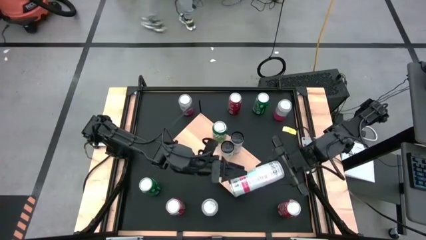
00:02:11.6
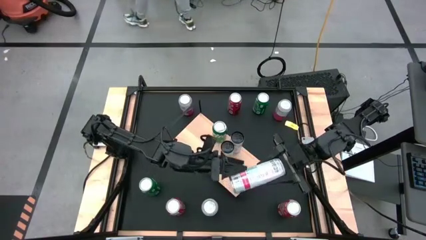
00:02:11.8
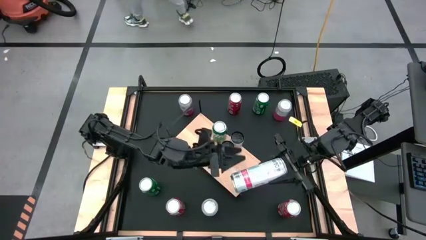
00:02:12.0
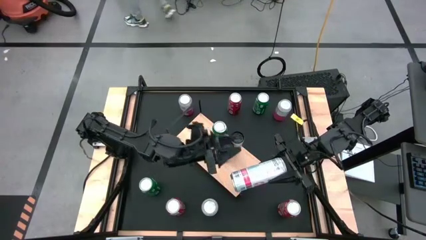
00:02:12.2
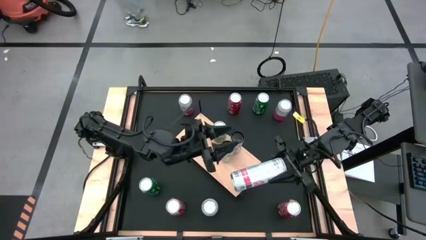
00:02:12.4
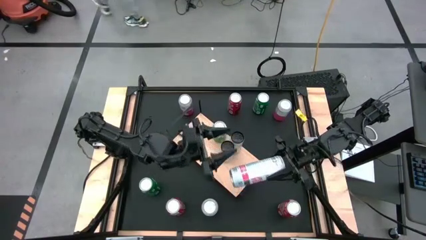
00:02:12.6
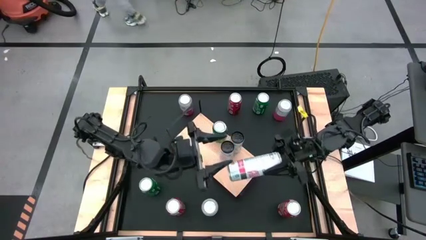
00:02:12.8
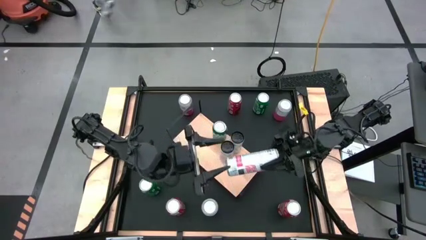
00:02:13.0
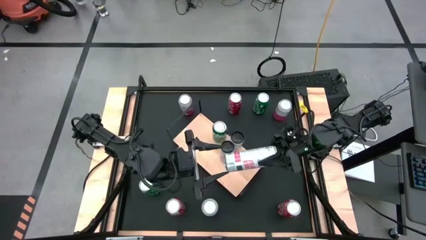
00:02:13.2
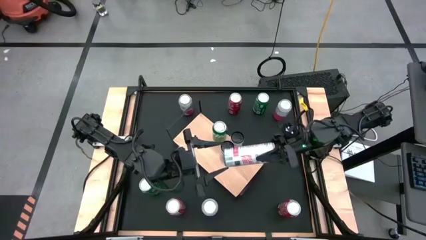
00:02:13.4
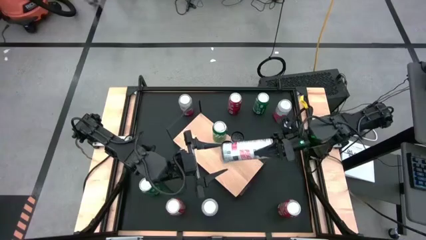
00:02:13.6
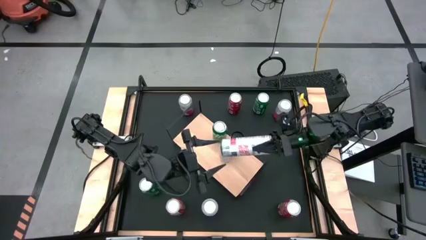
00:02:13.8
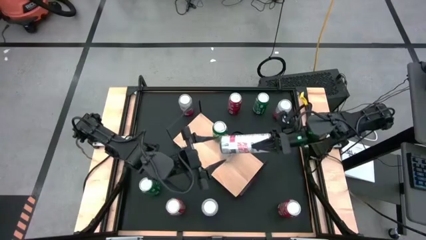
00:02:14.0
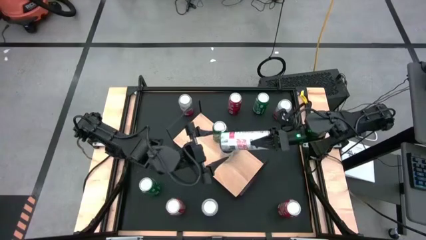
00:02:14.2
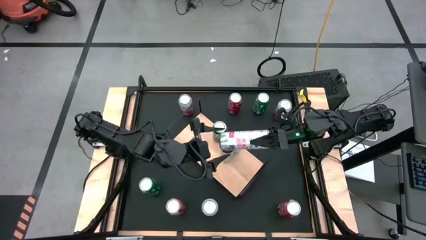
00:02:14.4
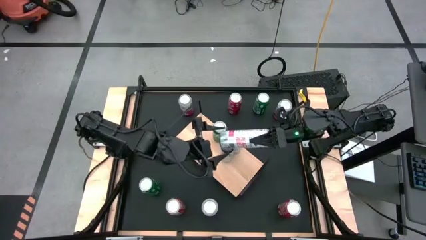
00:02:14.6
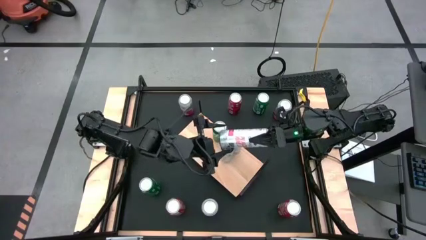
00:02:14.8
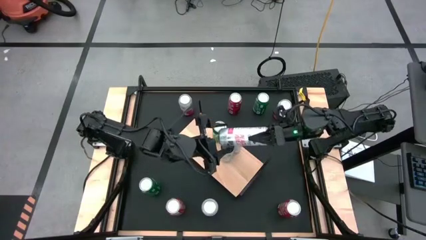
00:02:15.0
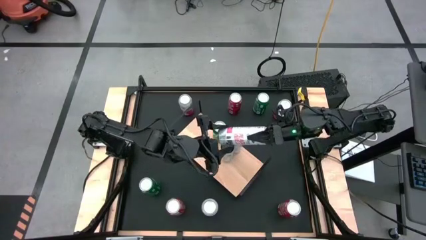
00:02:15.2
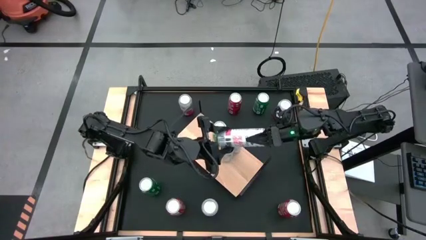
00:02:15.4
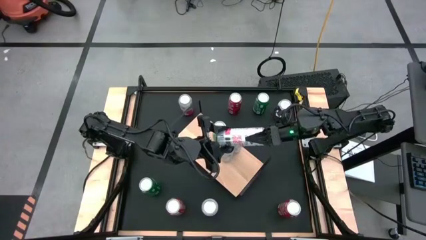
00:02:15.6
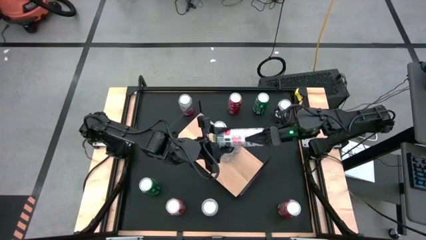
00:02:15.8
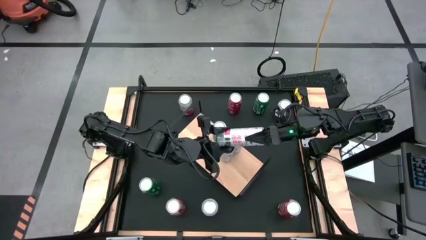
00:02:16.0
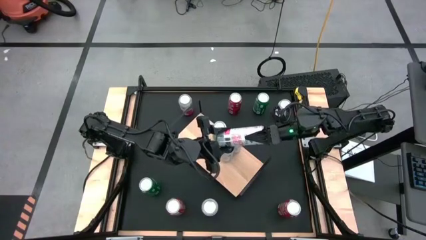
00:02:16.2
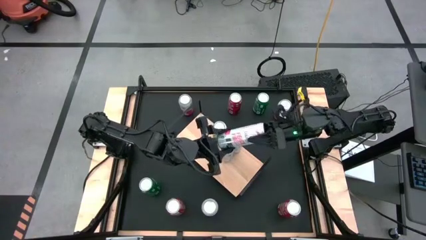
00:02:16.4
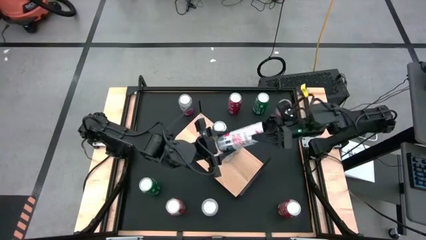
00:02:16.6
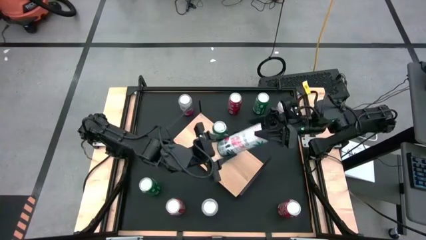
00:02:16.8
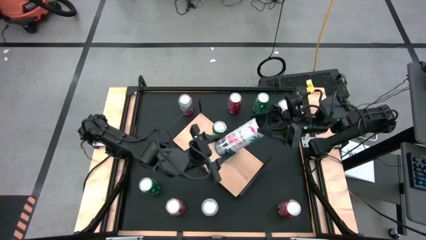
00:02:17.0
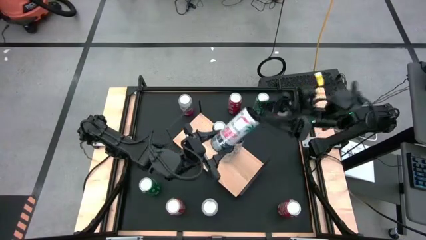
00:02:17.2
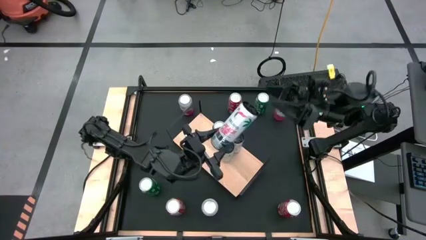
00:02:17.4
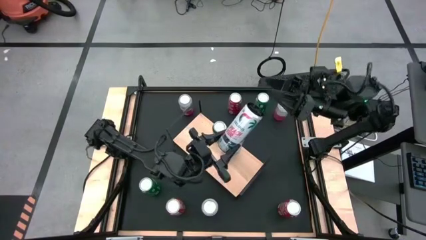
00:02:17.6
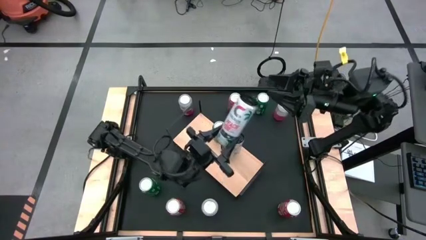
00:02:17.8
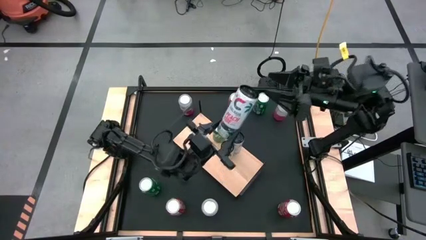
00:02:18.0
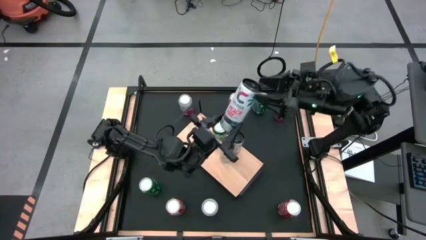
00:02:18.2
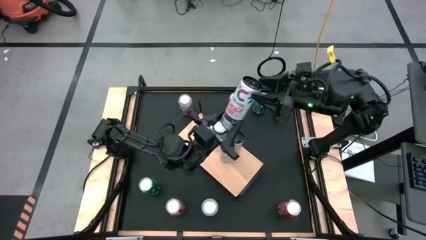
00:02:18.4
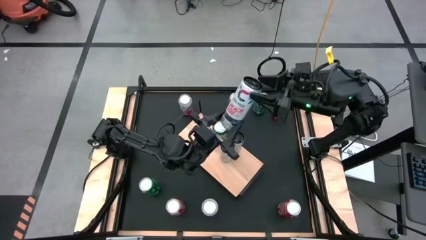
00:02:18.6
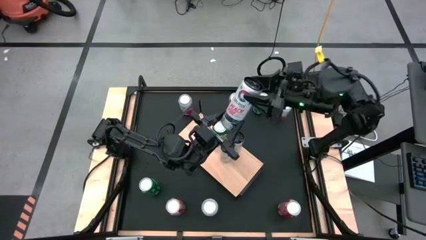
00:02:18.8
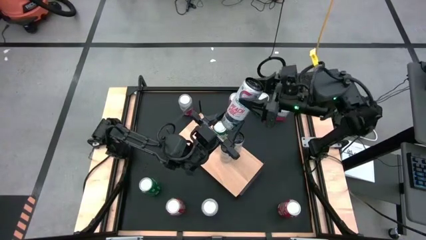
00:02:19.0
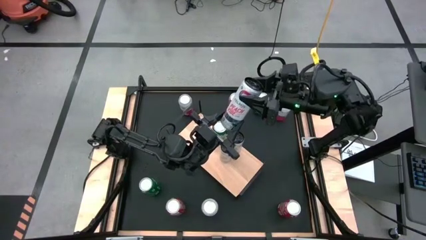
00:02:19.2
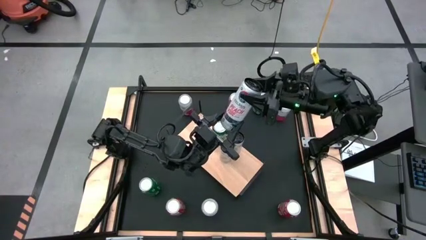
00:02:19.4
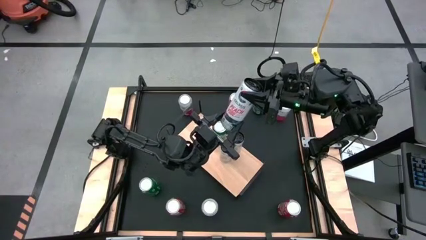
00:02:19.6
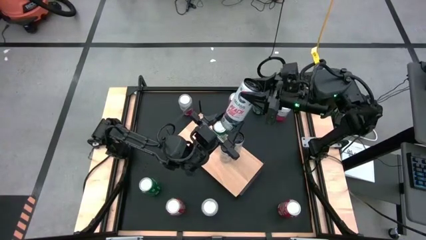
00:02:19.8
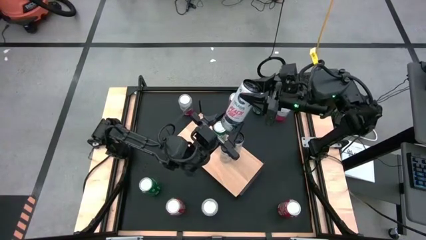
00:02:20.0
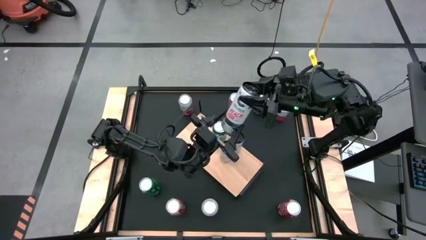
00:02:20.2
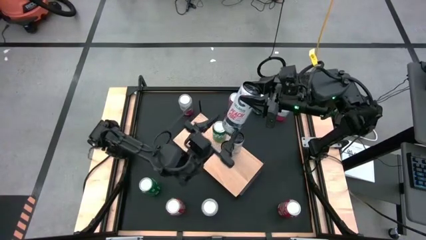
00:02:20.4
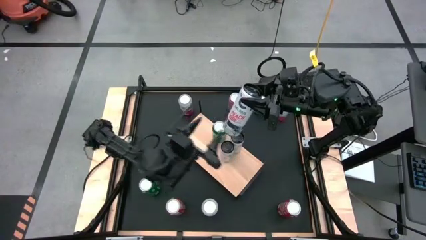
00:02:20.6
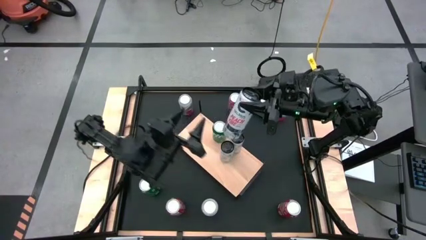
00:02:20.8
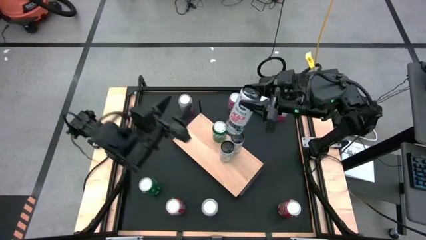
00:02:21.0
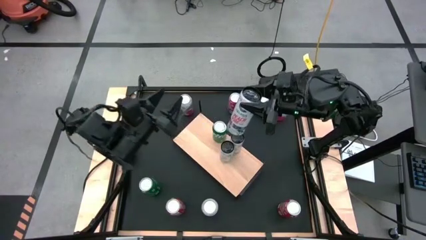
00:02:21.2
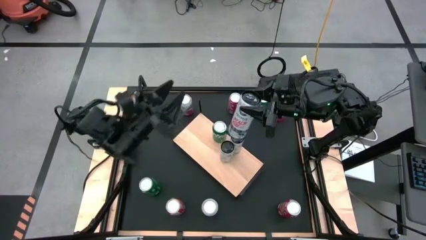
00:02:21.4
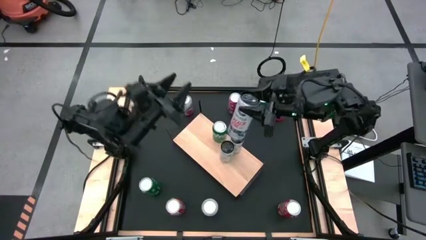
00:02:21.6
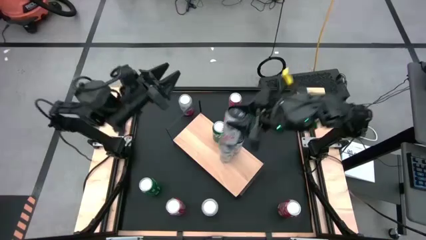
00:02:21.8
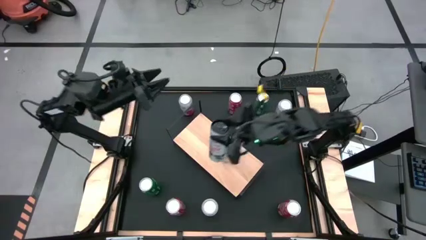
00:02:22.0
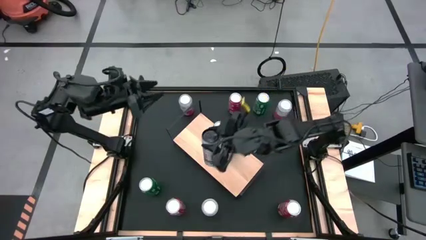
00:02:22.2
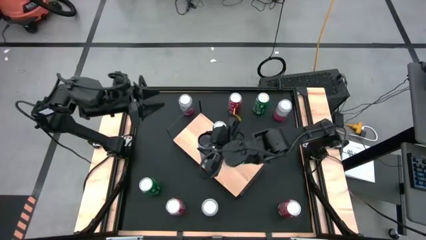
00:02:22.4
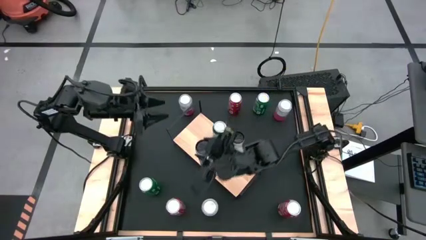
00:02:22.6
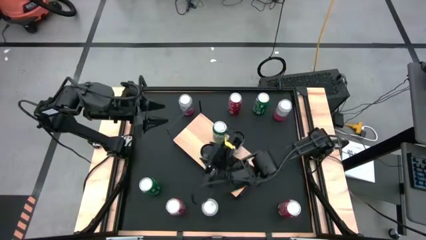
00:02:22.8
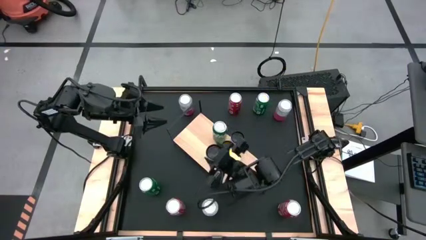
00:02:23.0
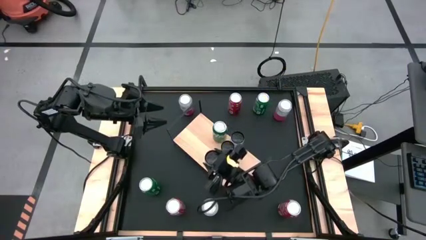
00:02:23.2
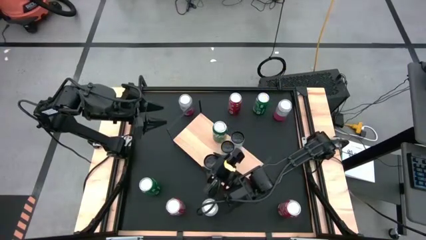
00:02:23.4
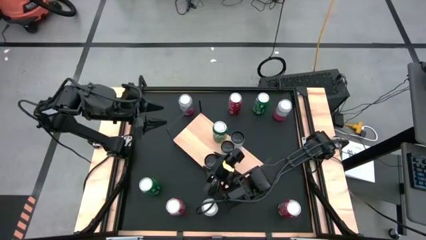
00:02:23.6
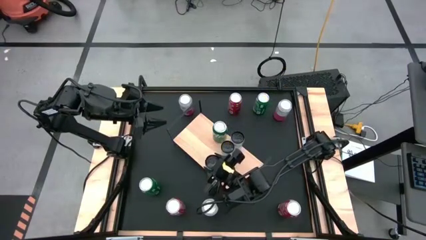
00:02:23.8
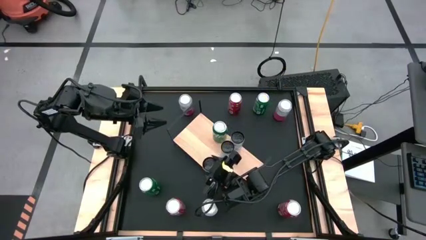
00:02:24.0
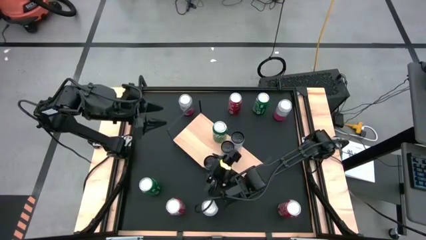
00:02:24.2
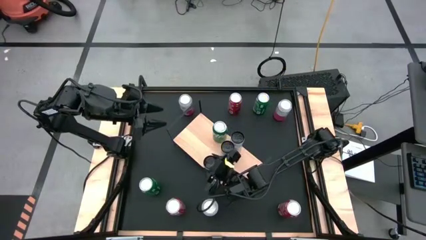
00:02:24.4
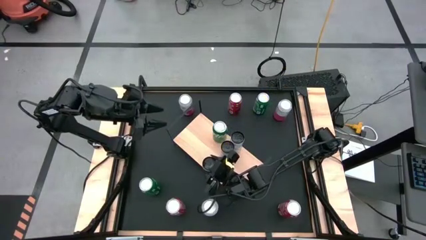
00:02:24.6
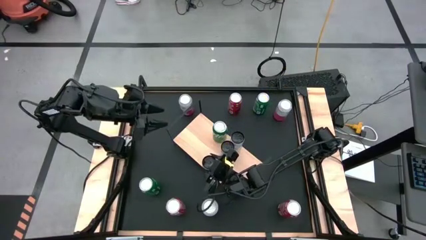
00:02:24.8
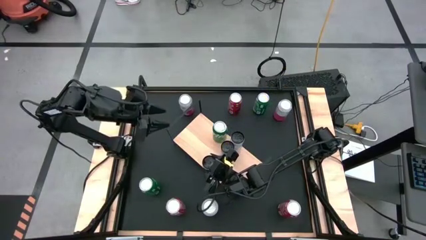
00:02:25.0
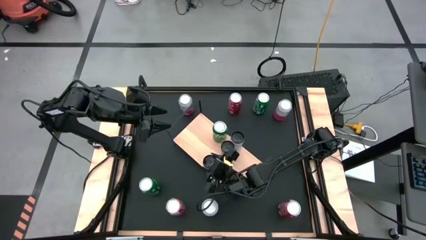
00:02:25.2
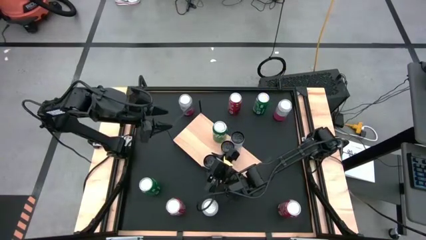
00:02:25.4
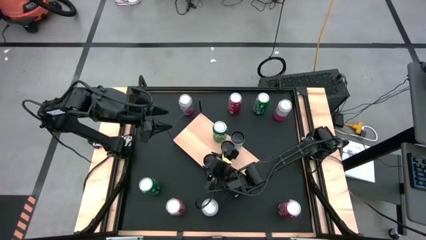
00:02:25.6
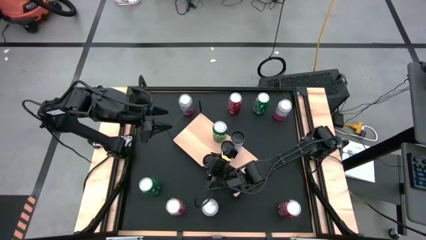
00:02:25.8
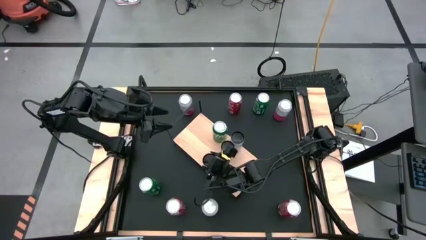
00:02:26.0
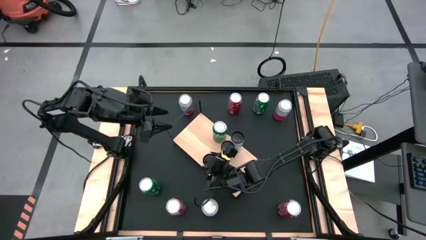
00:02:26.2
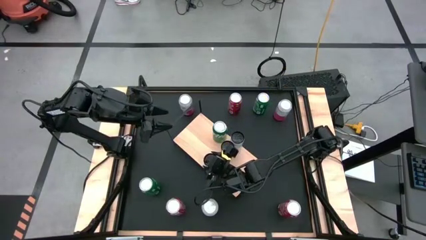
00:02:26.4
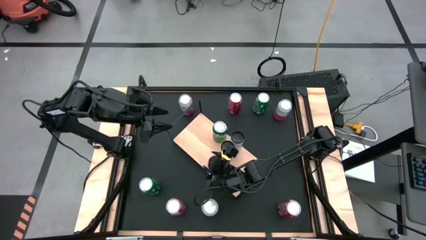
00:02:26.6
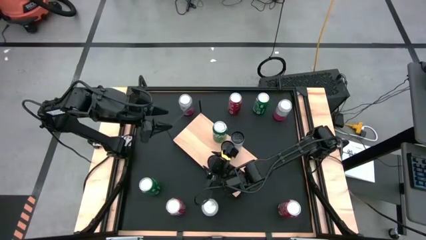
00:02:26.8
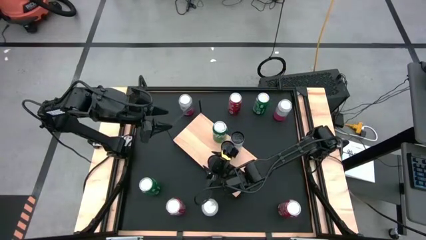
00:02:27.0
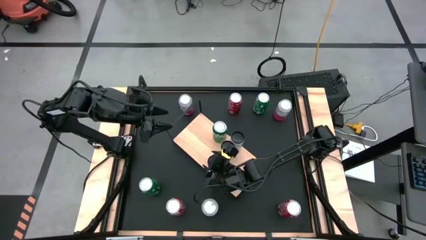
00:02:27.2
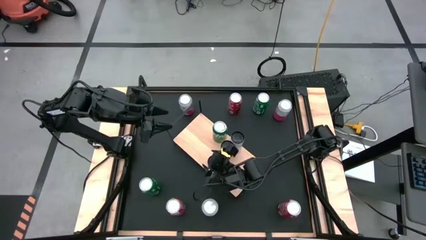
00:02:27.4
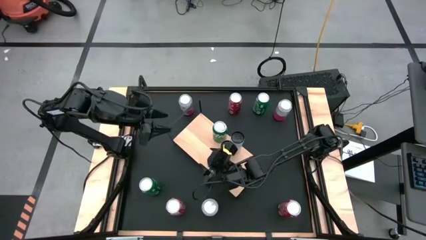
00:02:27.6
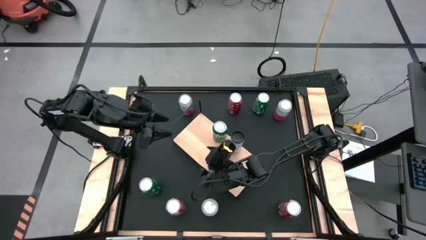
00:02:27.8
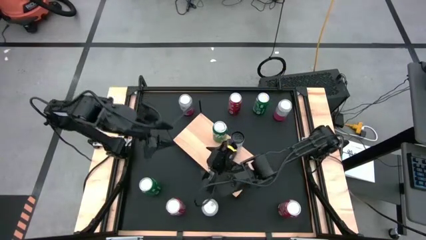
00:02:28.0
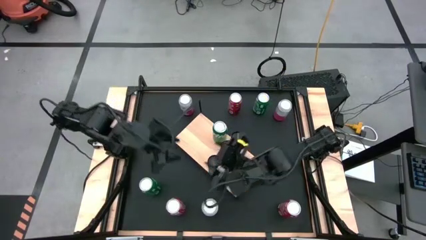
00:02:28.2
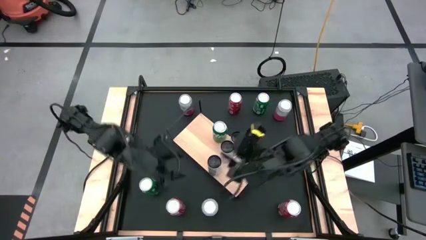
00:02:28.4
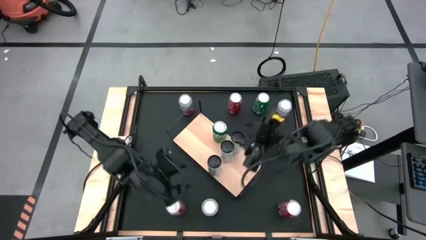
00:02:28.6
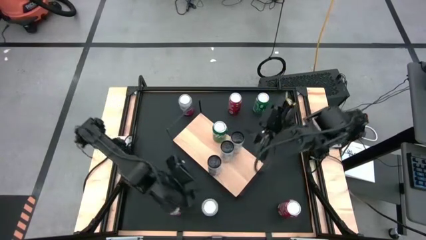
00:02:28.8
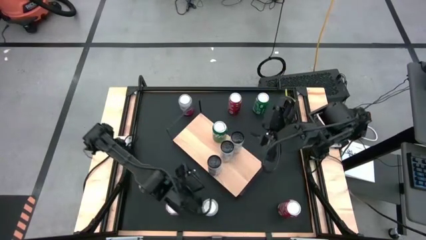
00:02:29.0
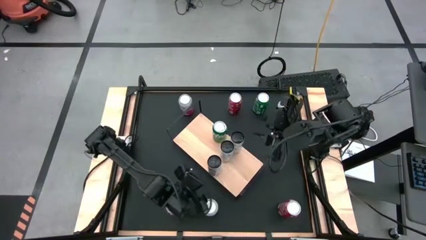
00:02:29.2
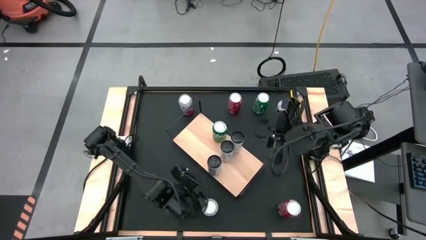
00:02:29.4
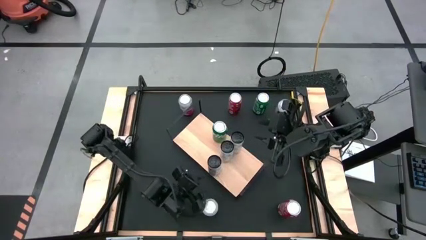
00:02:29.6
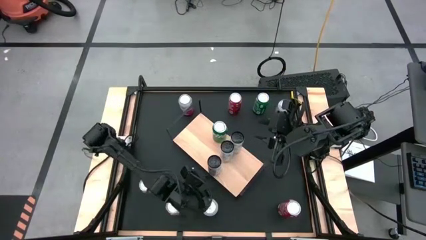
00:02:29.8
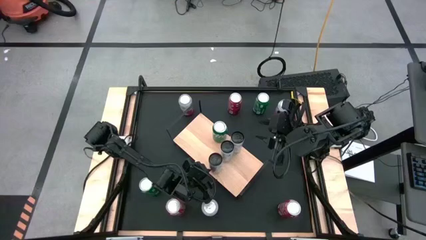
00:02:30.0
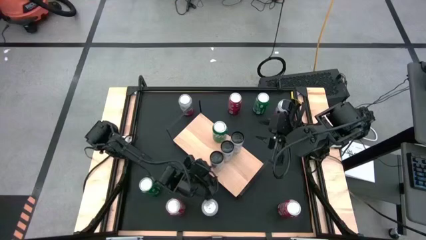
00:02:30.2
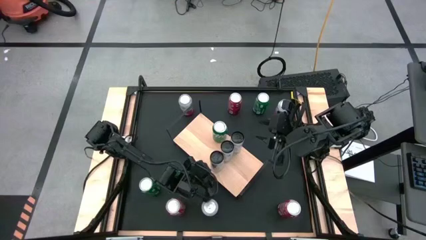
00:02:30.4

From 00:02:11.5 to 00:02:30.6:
Task: Place canned beverage on shelf
Put the white soda can aligned with the other white soda can
